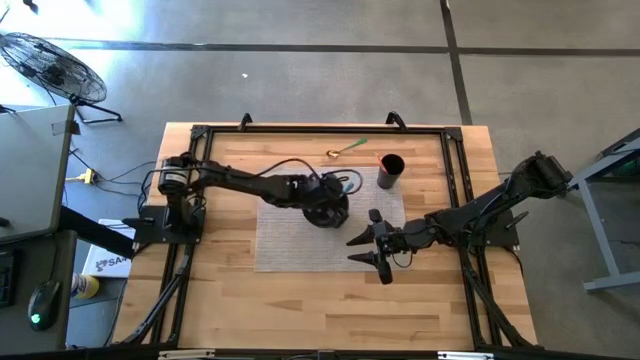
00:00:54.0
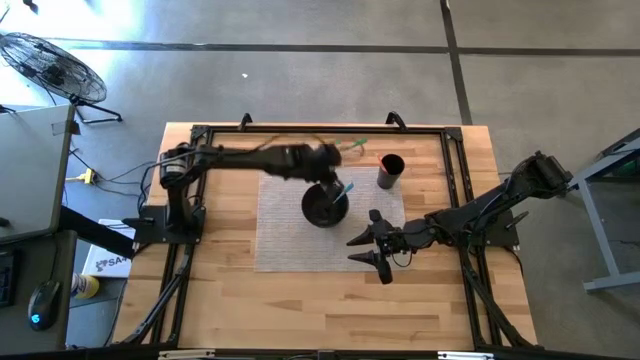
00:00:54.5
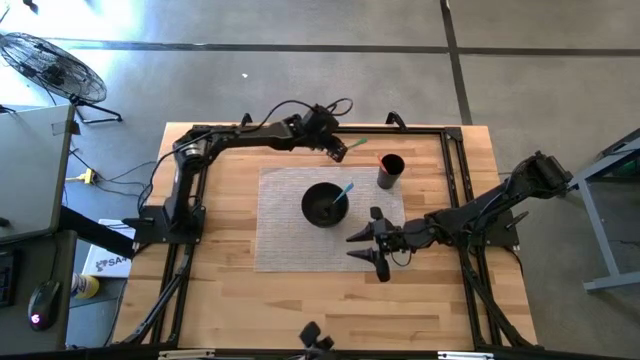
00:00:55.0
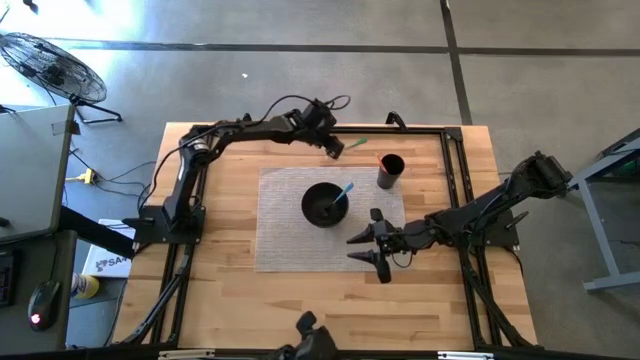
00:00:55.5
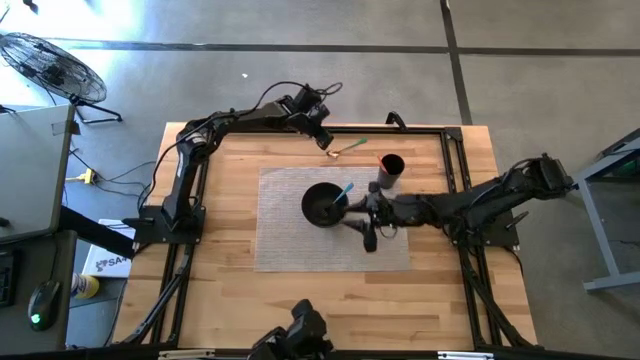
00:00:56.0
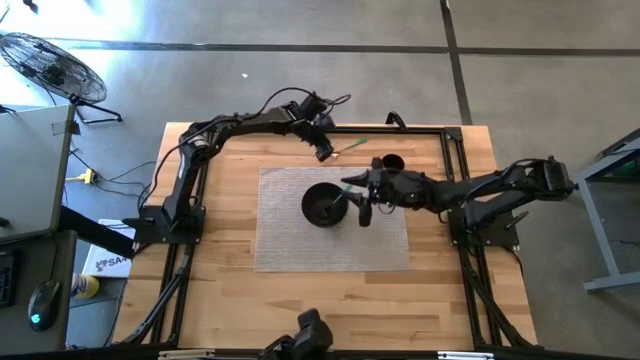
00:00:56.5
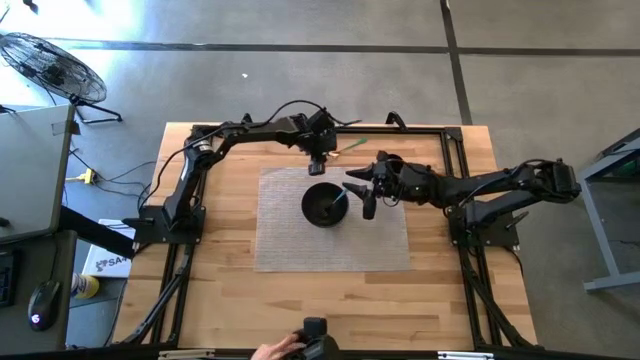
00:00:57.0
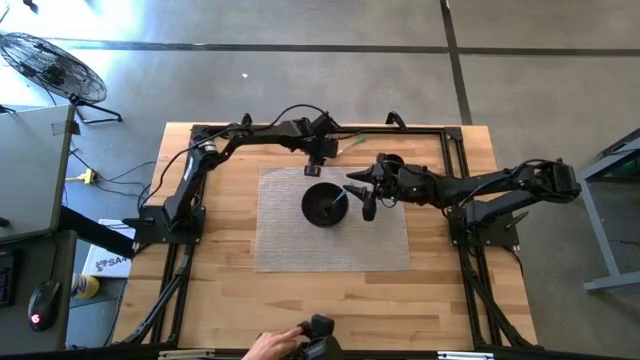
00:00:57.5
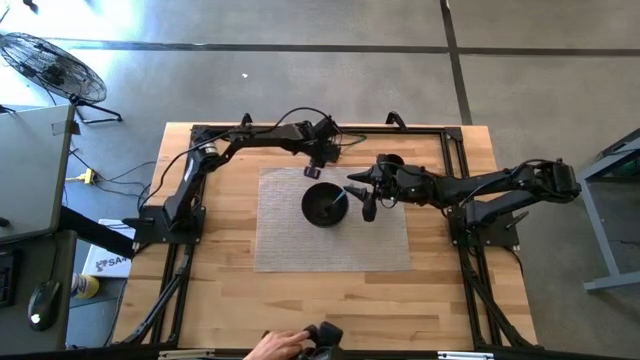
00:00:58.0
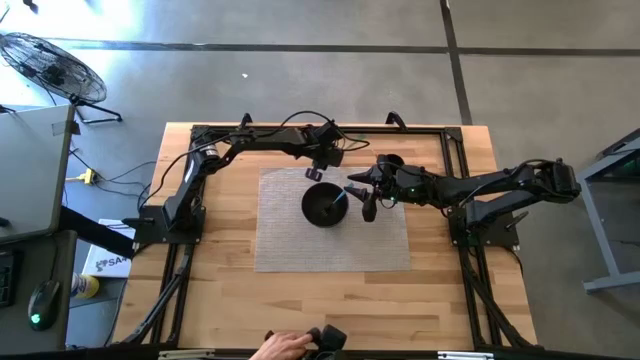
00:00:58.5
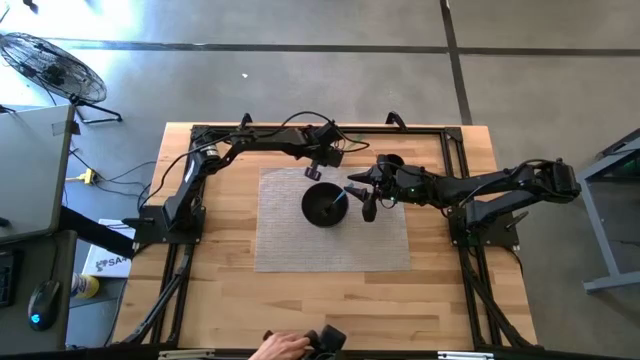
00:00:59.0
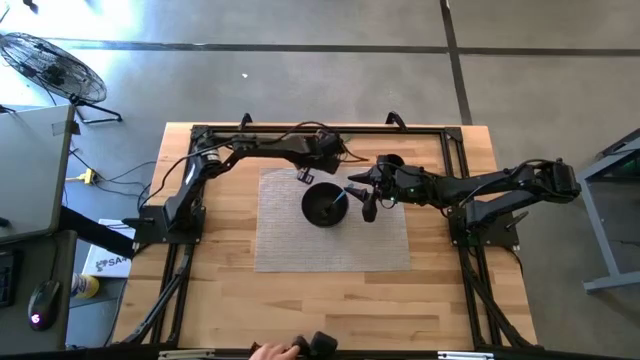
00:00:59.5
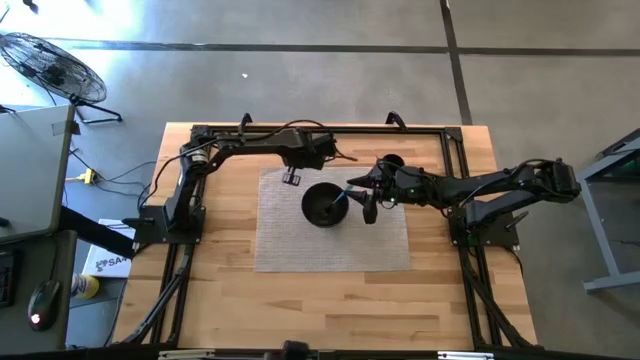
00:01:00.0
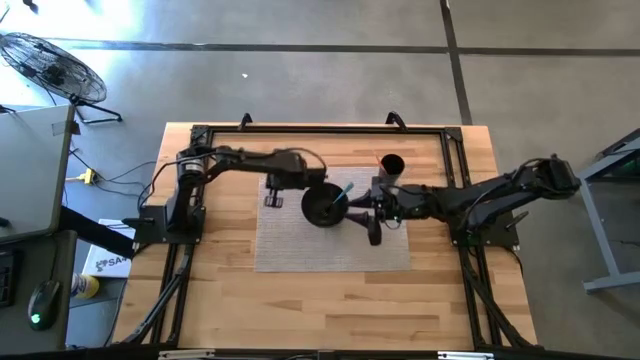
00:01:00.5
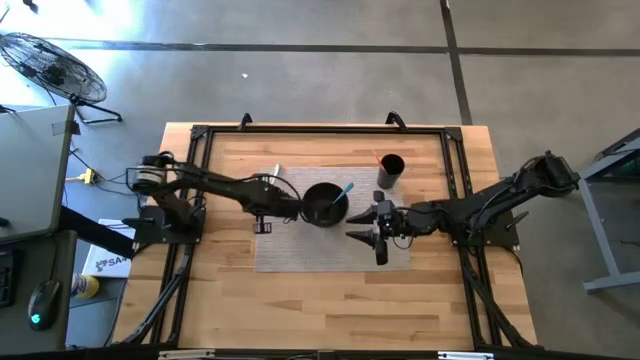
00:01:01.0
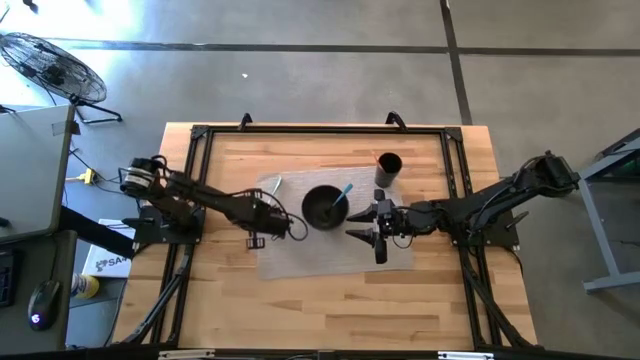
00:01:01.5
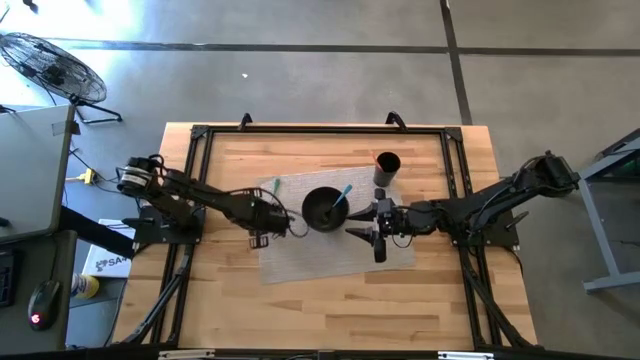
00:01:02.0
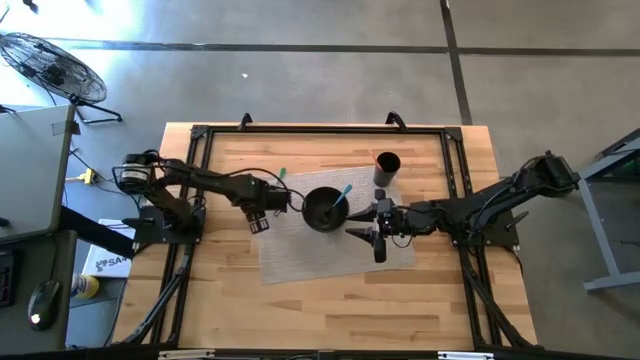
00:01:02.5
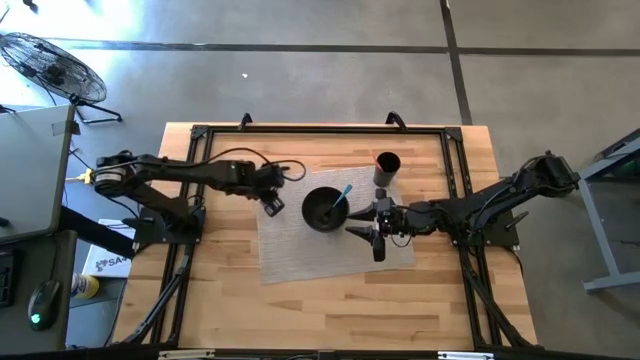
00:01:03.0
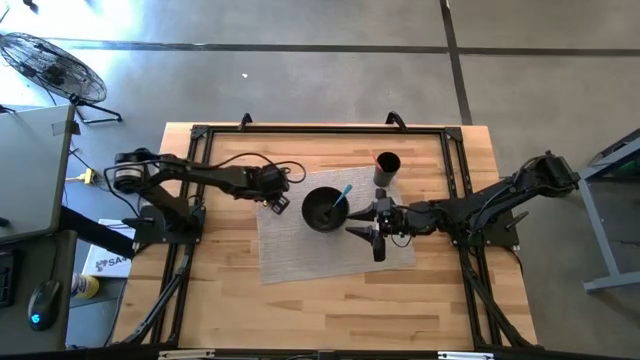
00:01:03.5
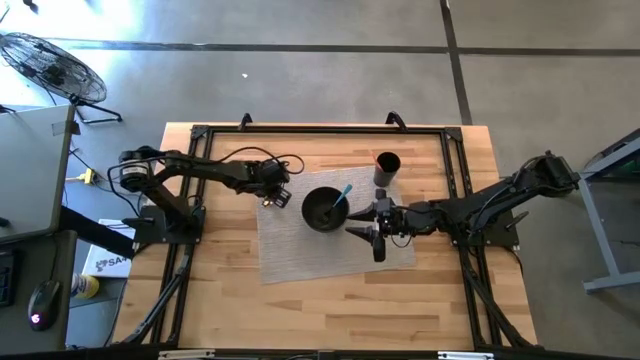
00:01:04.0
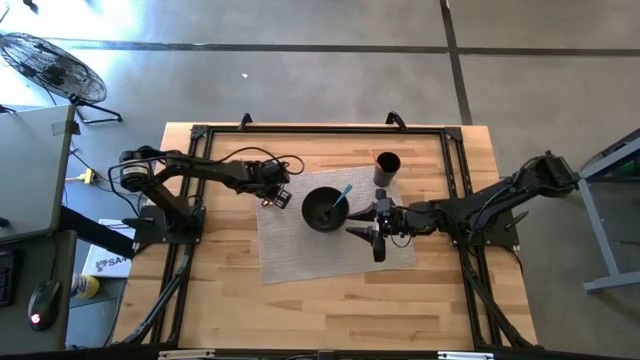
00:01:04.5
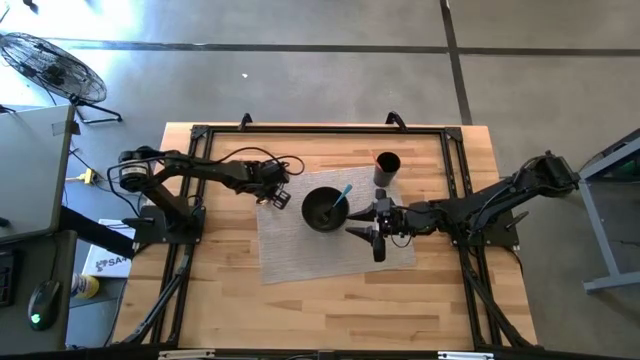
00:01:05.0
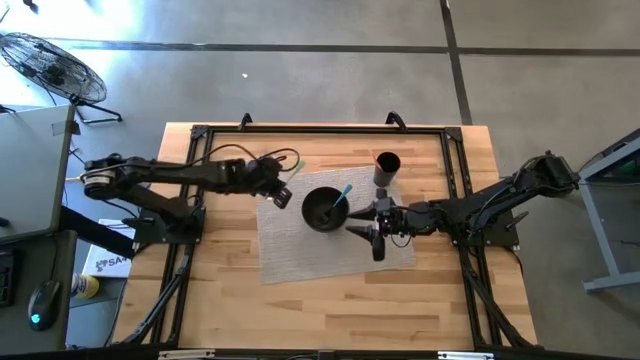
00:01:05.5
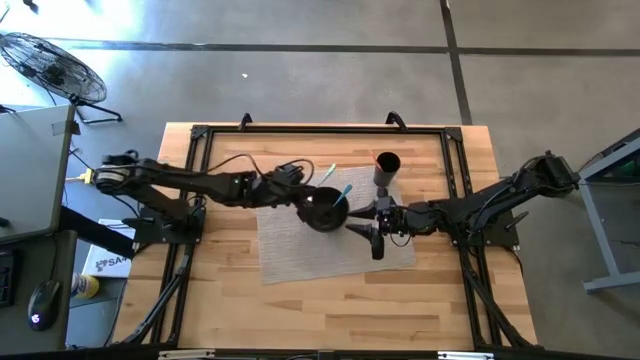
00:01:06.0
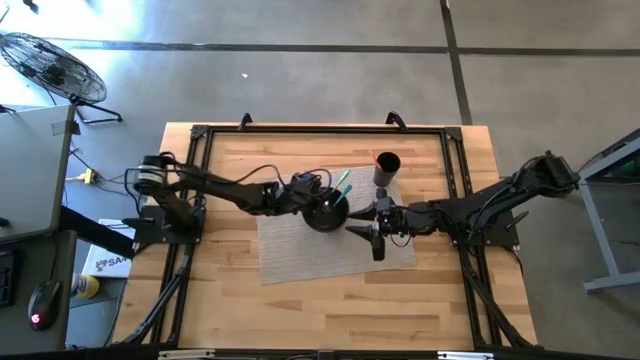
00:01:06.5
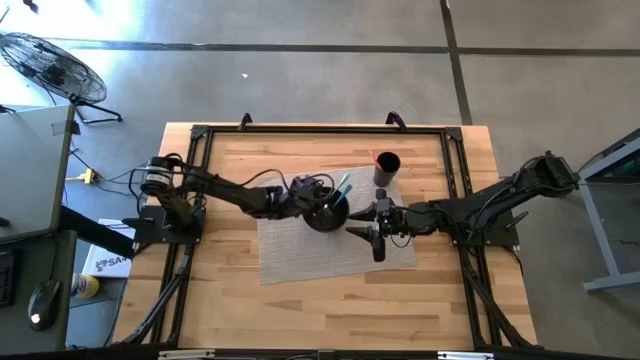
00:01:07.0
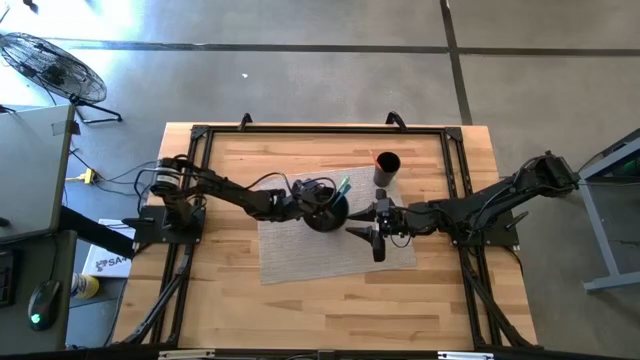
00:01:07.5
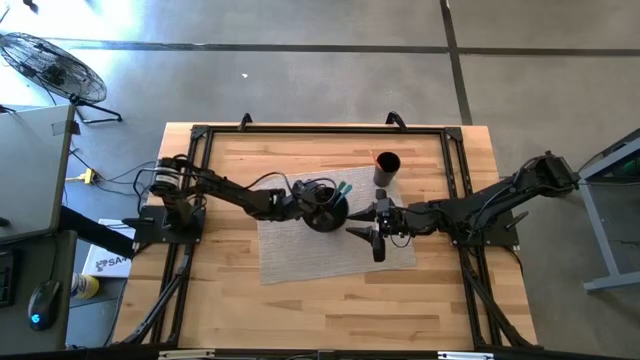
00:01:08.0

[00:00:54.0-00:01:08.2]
Task: Pick & Place Utensil
Put the green spoon into the black bowl

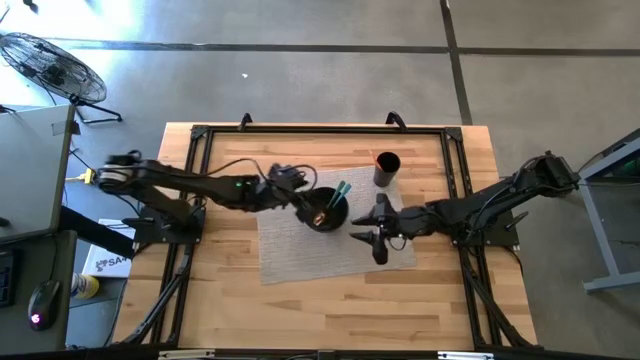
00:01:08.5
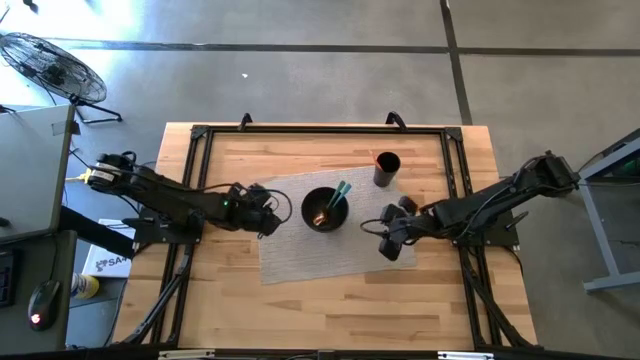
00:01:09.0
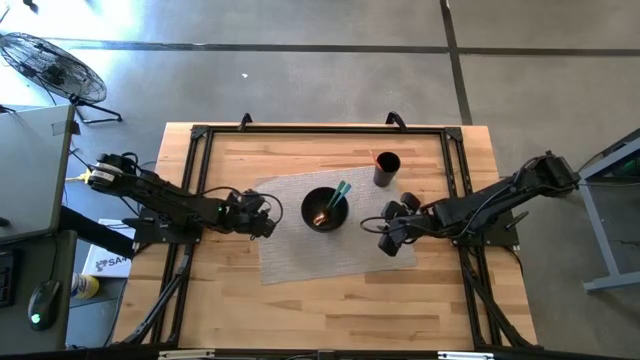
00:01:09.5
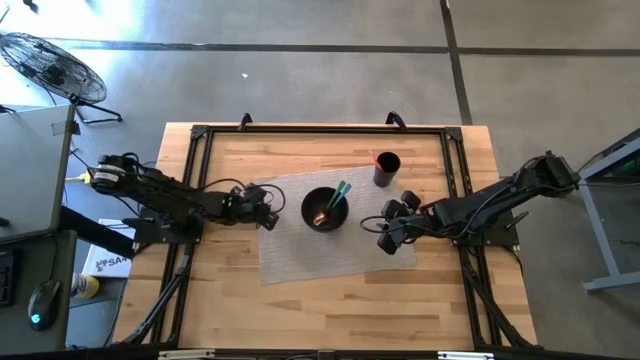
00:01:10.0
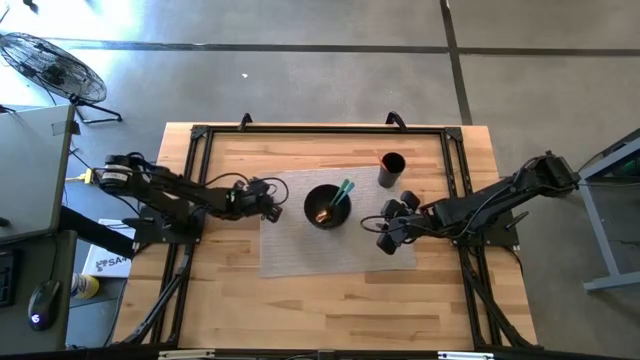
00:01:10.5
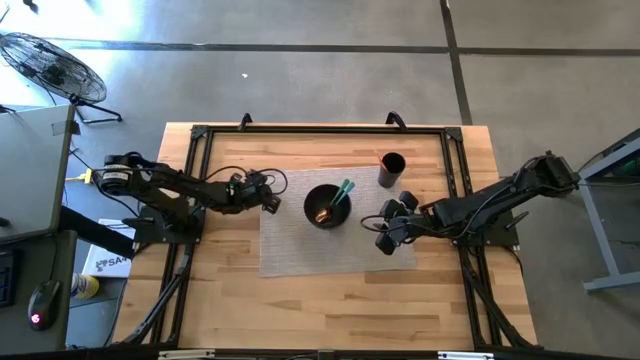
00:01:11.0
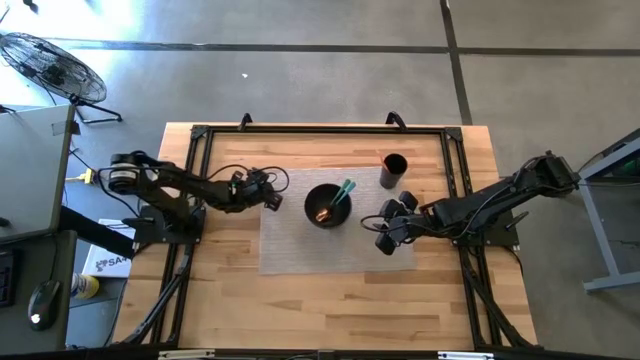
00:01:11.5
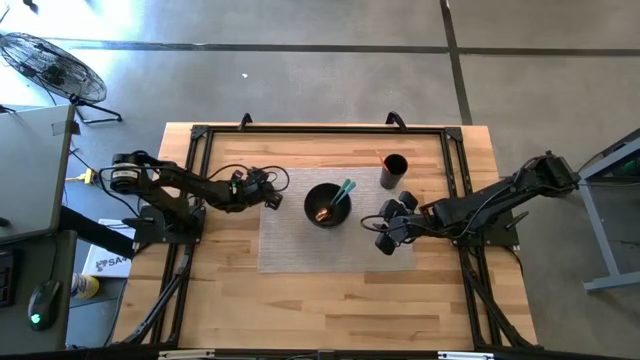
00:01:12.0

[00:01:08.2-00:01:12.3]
Adjust the gray mat

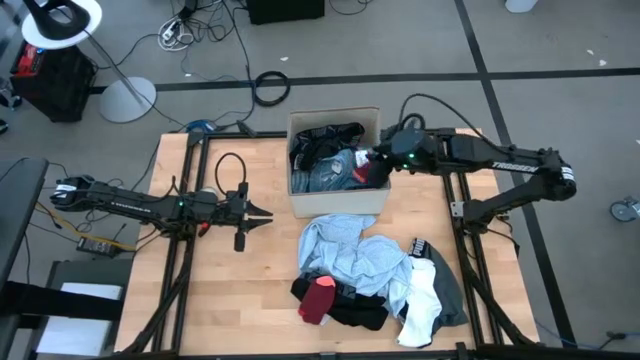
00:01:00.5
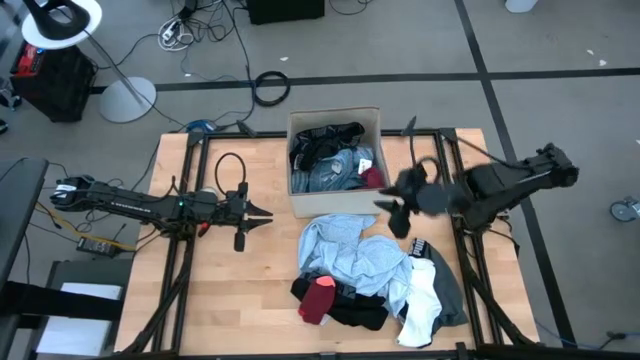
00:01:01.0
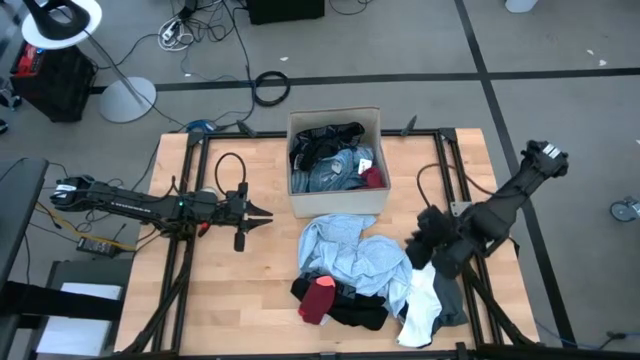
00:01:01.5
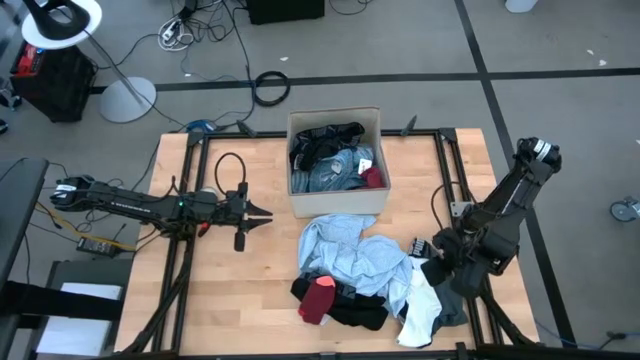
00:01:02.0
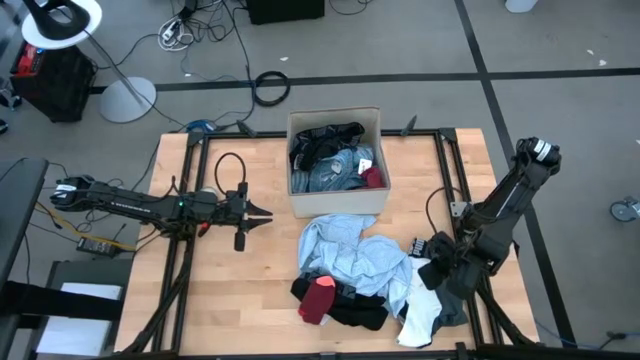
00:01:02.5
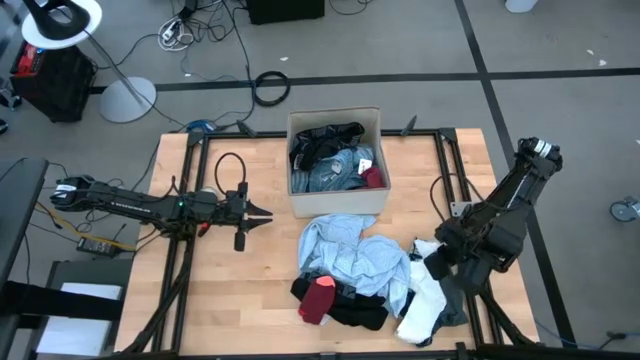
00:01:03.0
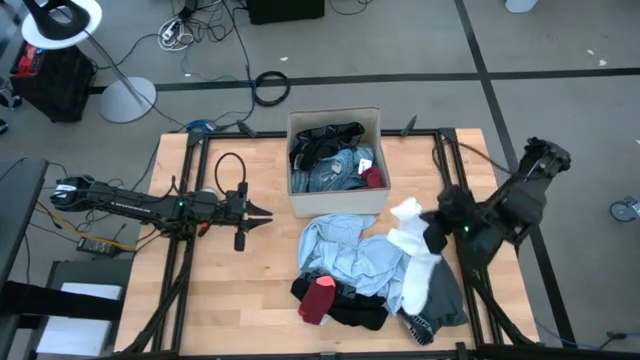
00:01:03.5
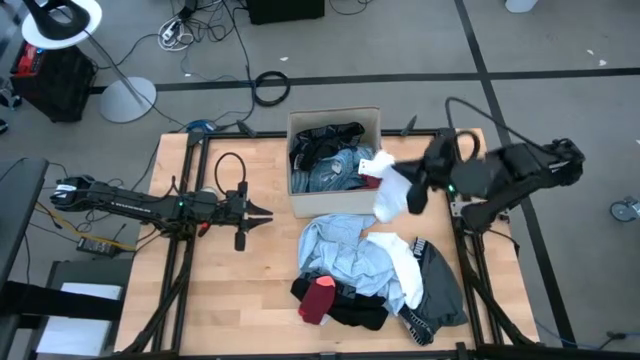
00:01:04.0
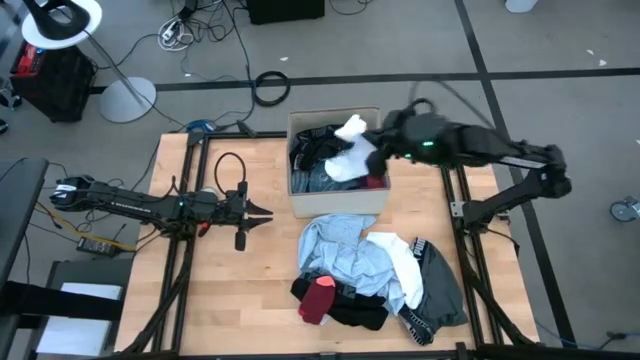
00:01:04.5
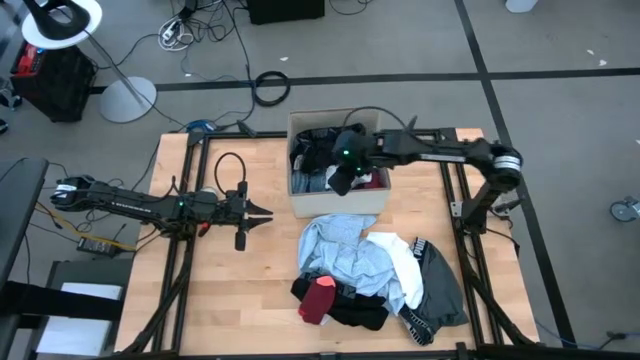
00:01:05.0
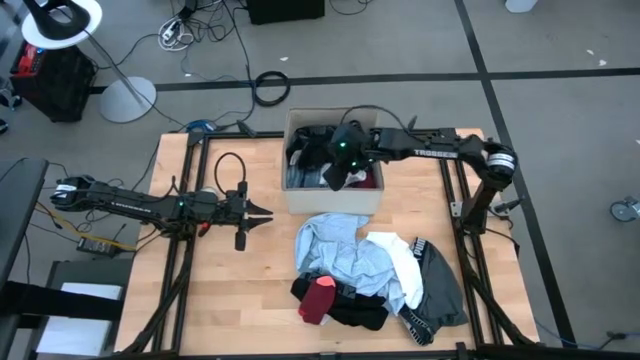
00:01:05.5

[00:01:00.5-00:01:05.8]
Task: Sort clothes
Put the white sock into the white laundry bin
